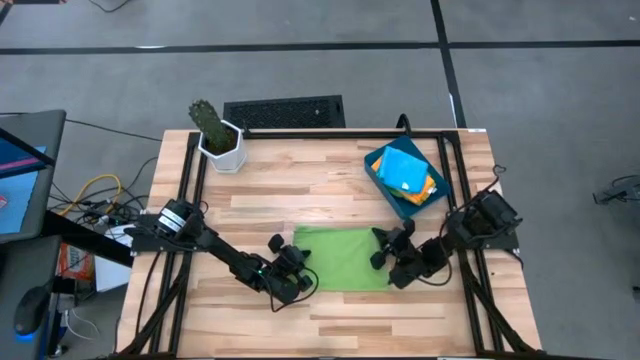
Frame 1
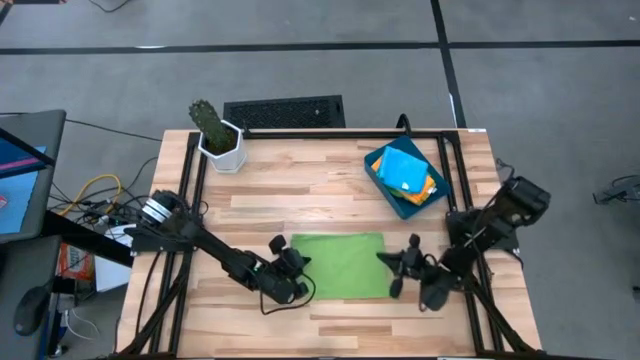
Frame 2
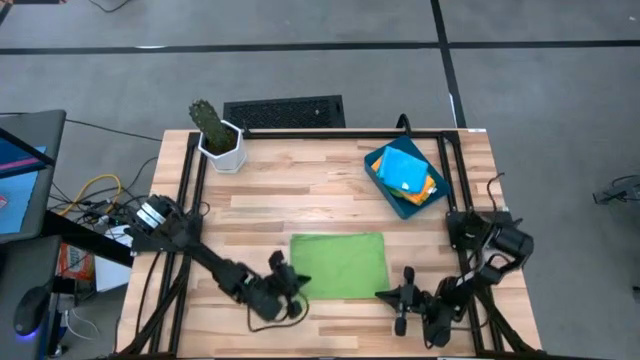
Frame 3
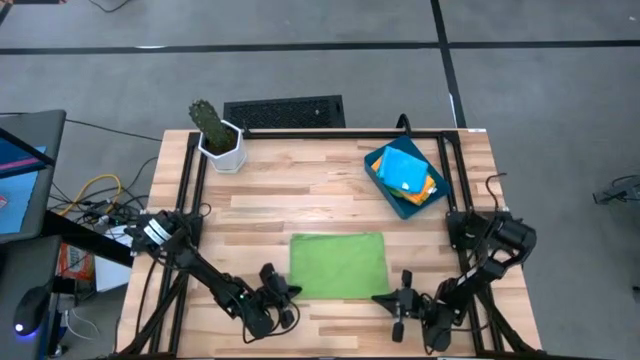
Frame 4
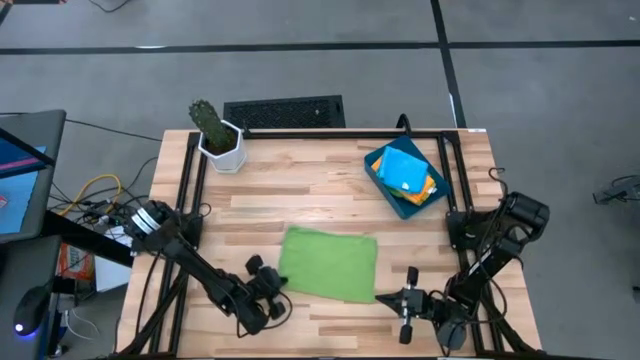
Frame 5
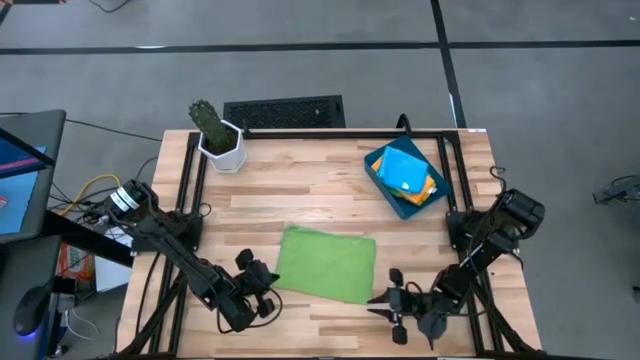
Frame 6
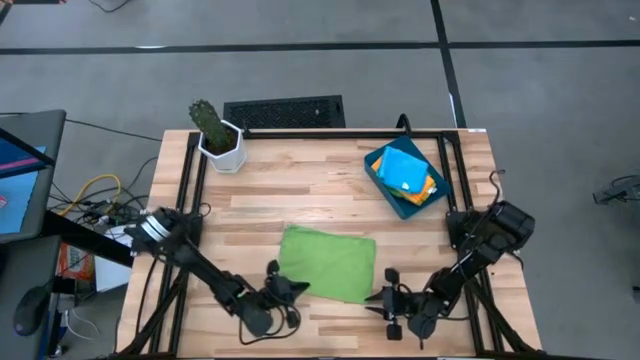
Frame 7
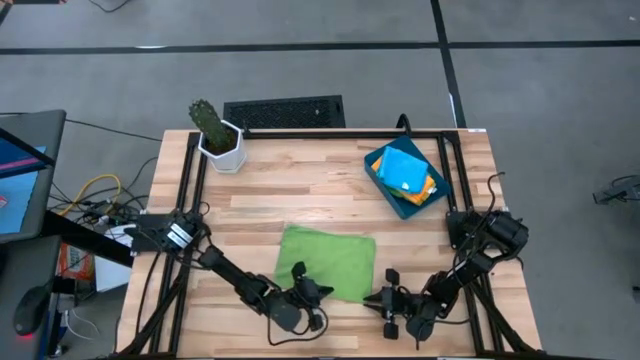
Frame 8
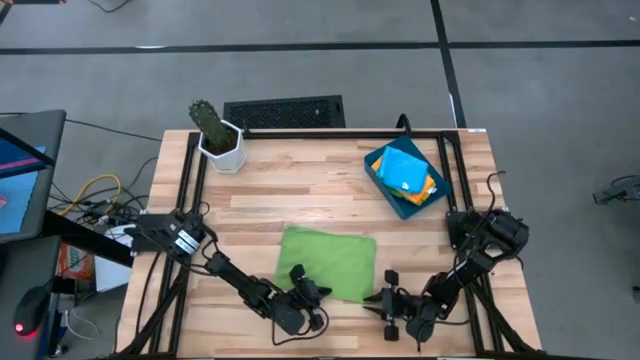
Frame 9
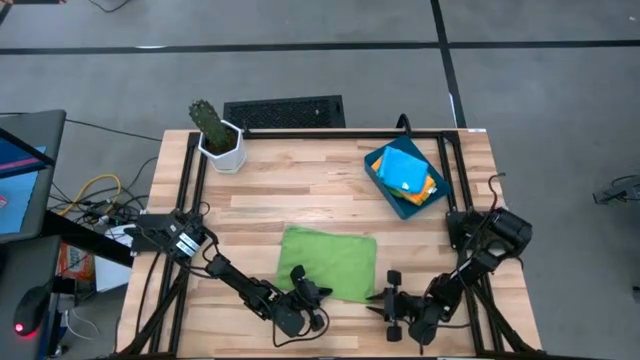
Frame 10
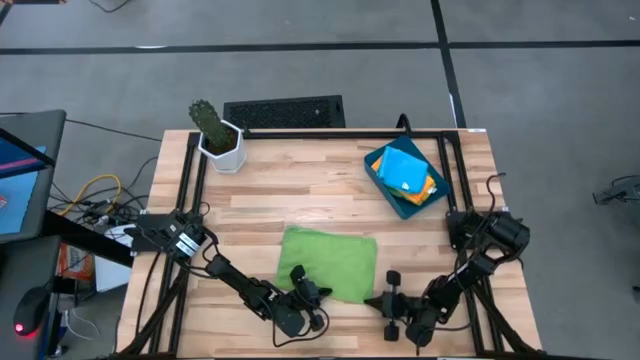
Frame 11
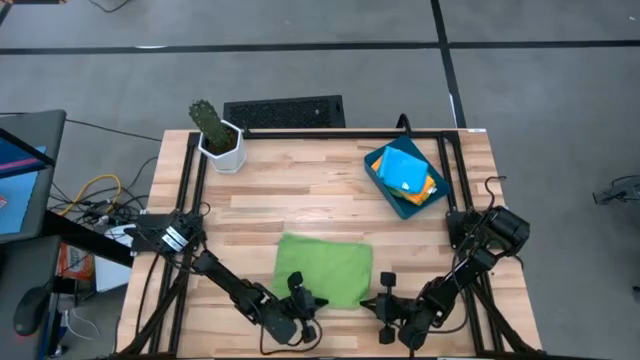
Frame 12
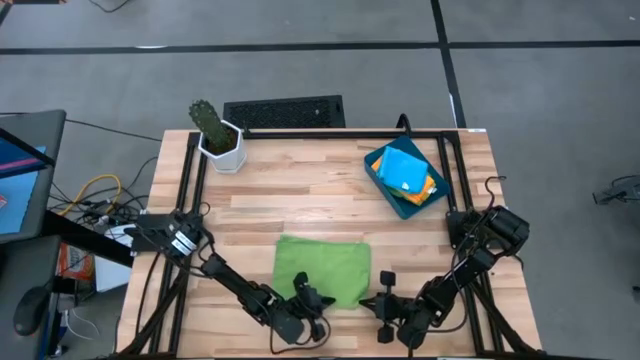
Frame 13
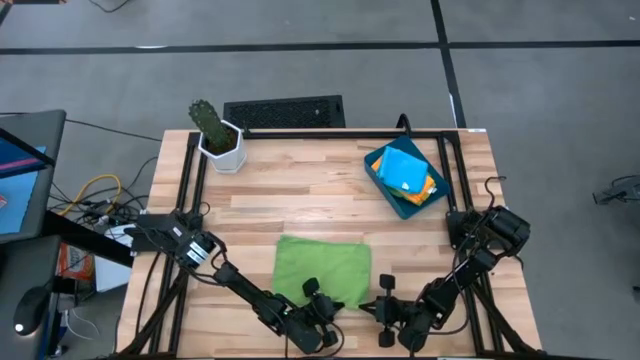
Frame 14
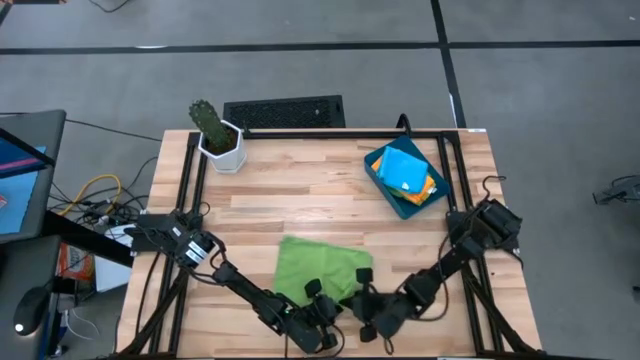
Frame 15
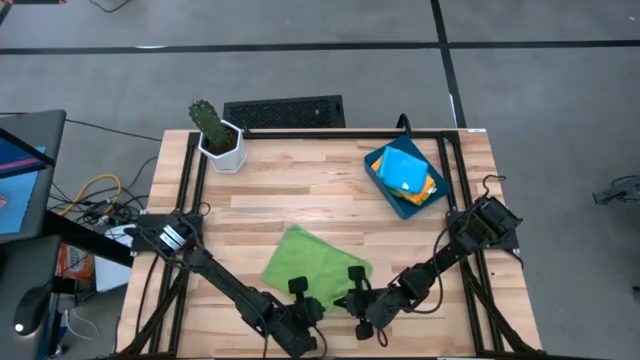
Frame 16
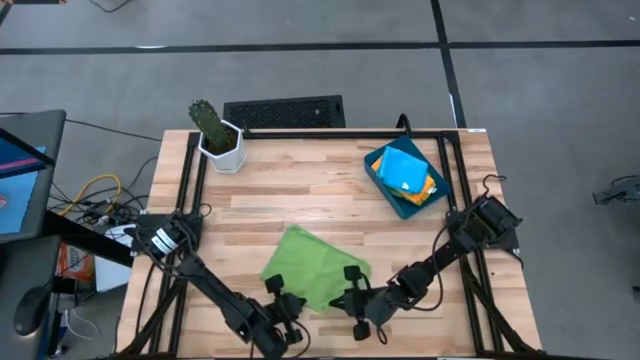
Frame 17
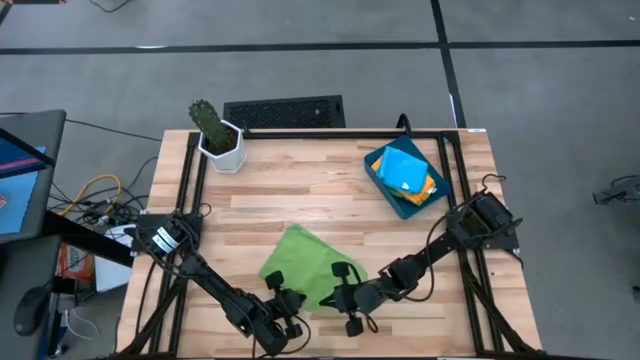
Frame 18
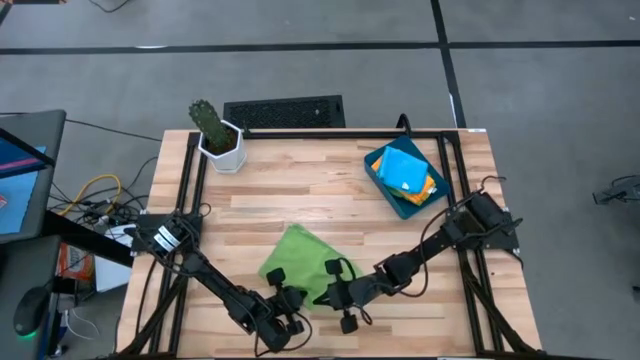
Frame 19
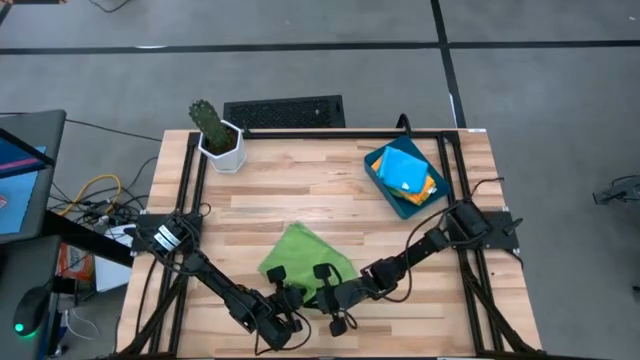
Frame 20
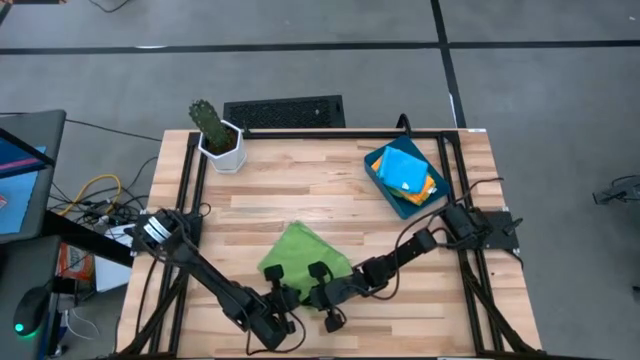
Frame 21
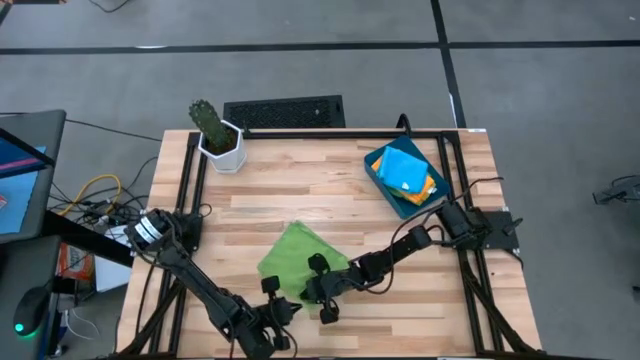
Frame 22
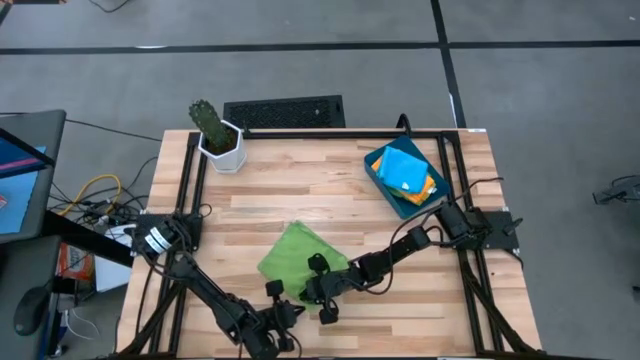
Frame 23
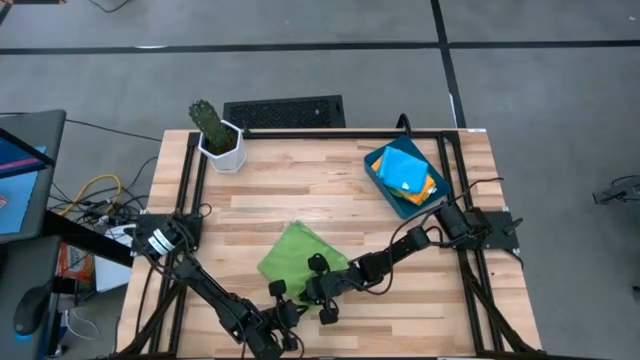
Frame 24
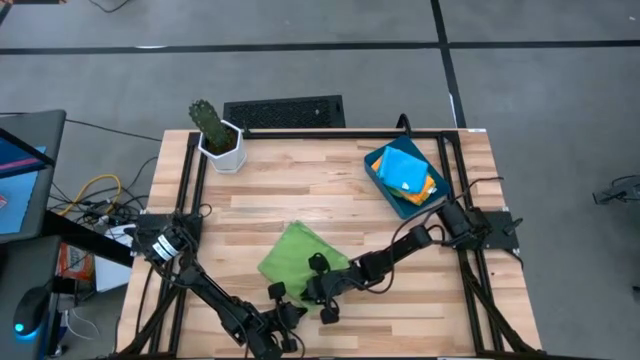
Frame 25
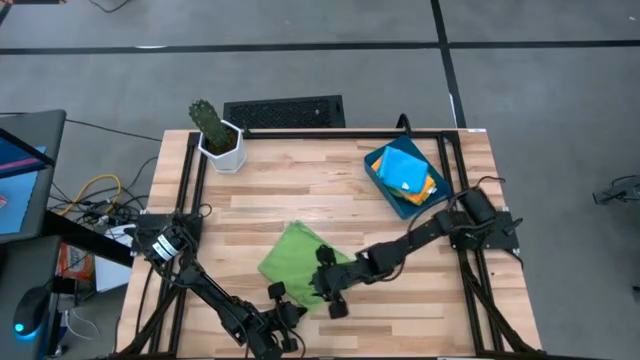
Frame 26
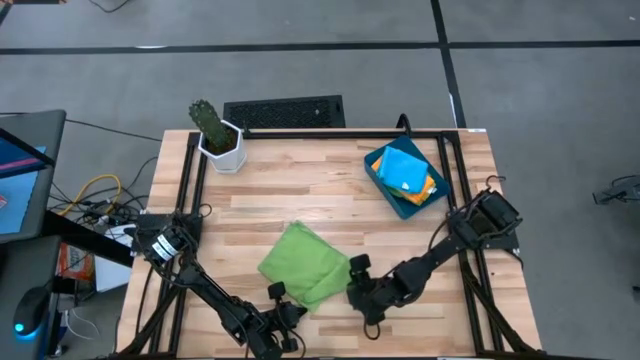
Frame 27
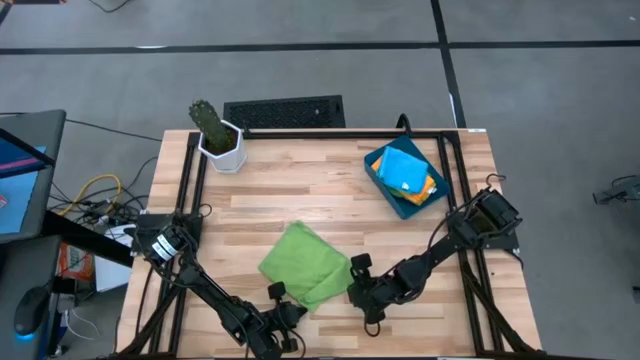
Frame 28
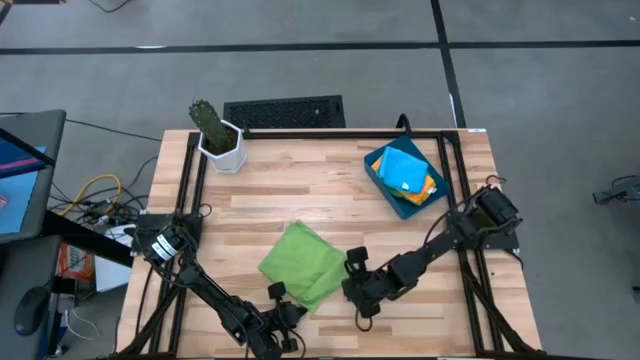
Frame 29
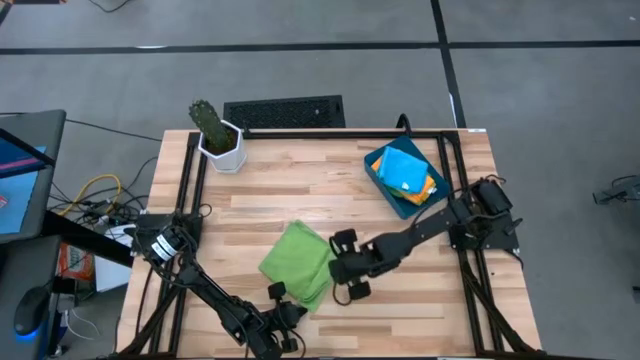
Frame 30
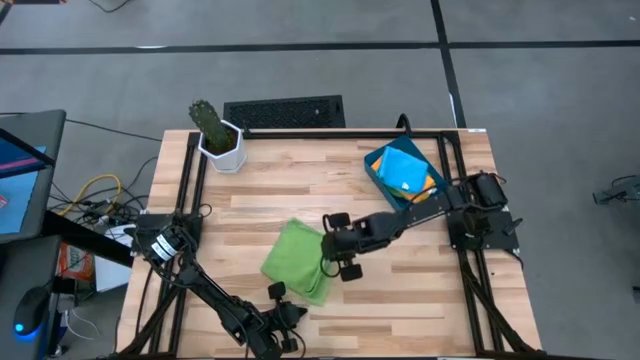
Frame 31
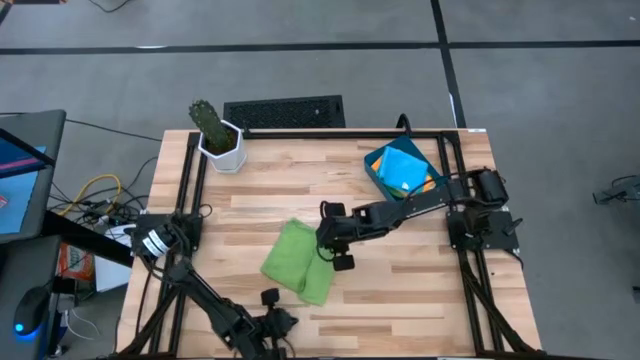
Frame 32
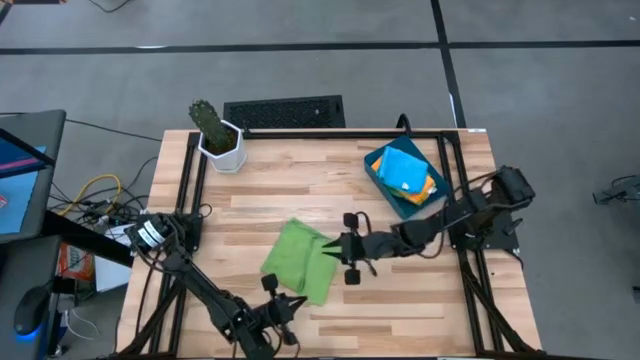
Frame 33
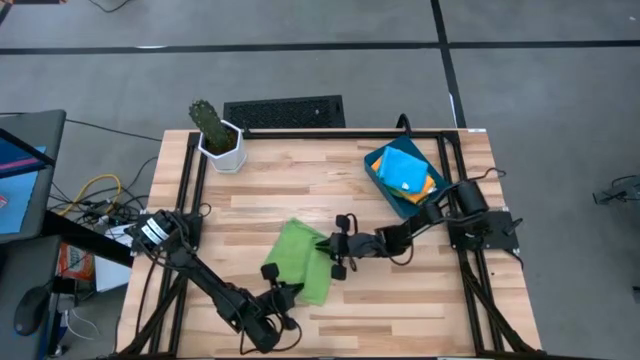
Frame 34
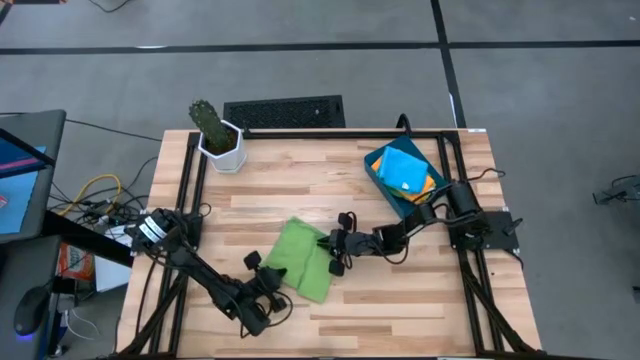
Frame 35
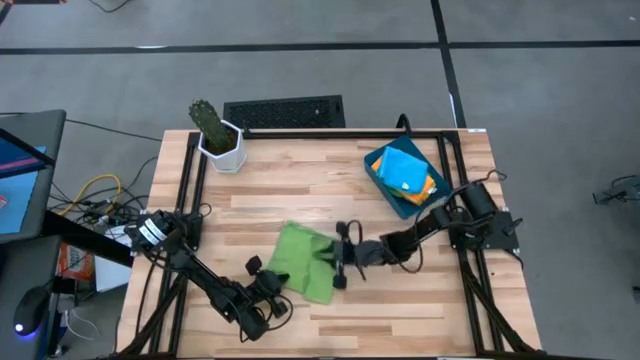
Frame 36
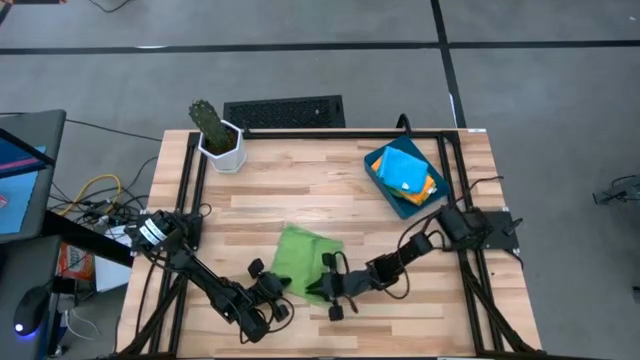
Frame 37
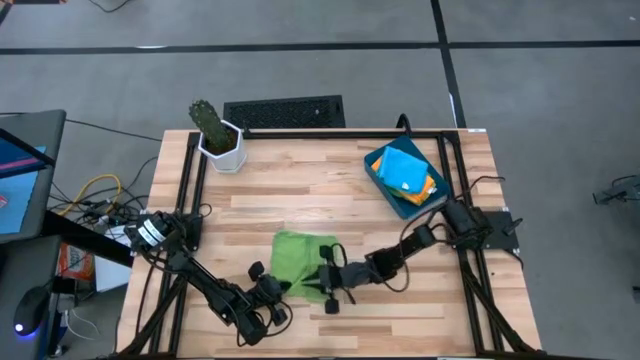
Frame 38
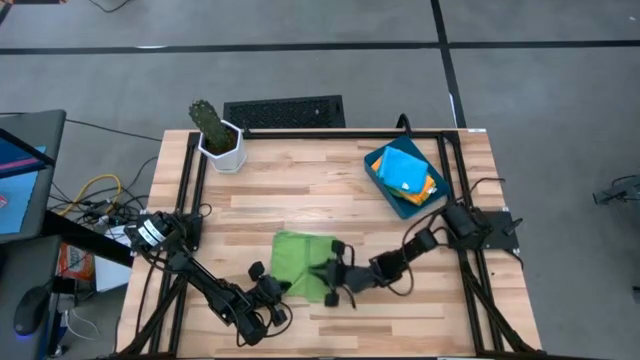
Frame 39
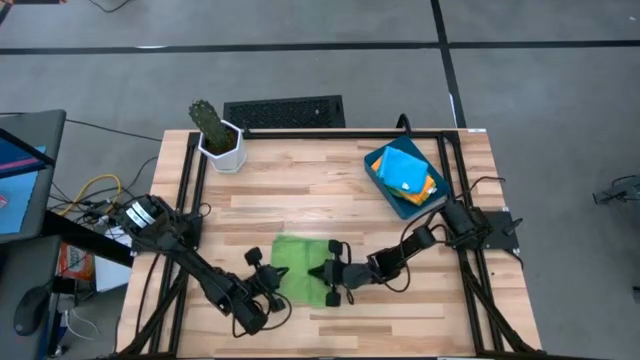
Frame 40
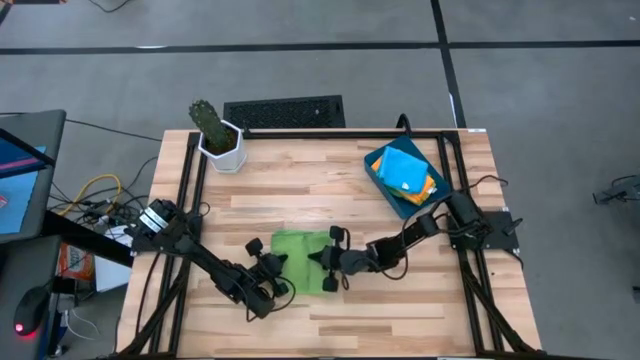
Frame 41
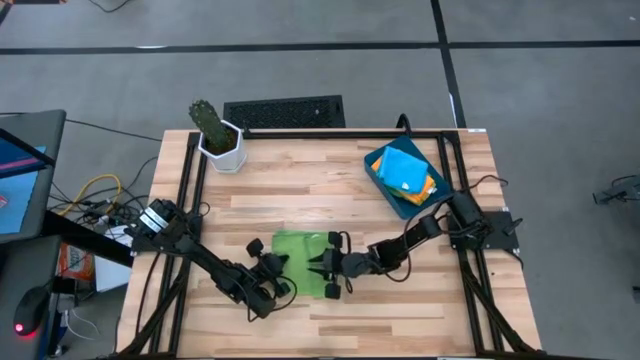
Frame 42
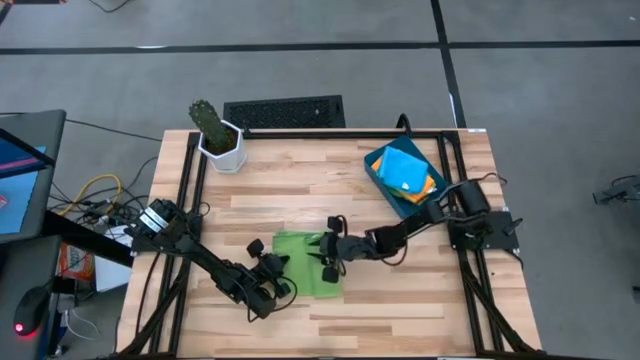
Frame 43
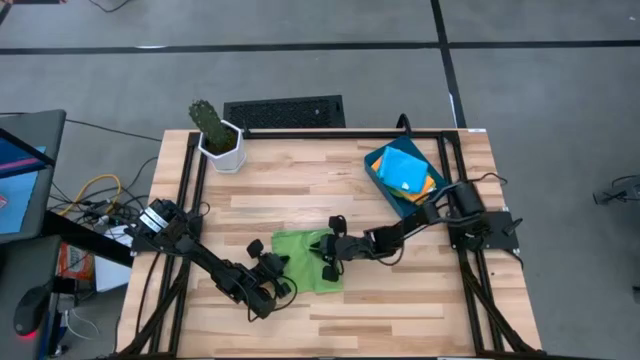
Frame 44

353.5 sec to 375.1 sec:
Task: Fold microfiber towels
Fold the green microfiber cloth
